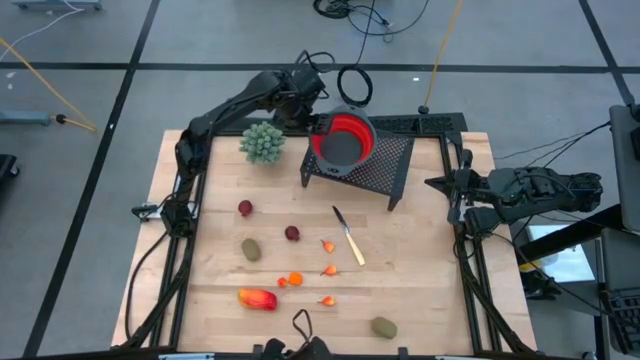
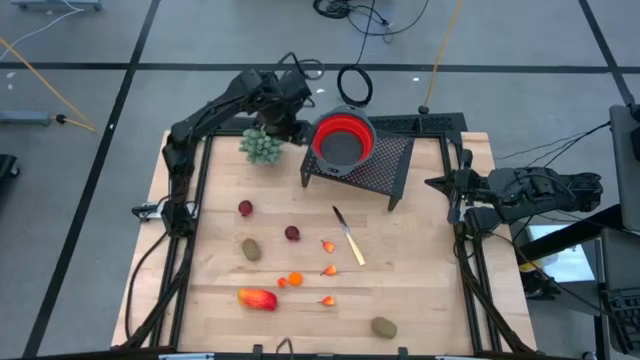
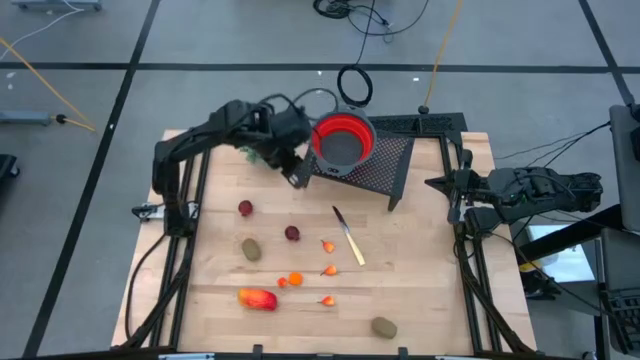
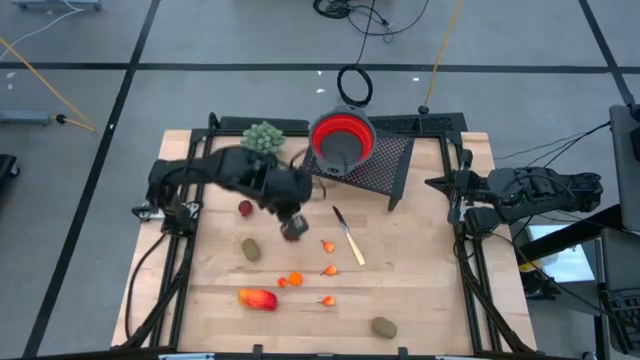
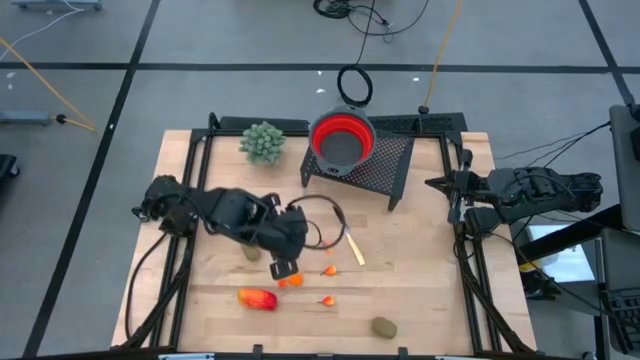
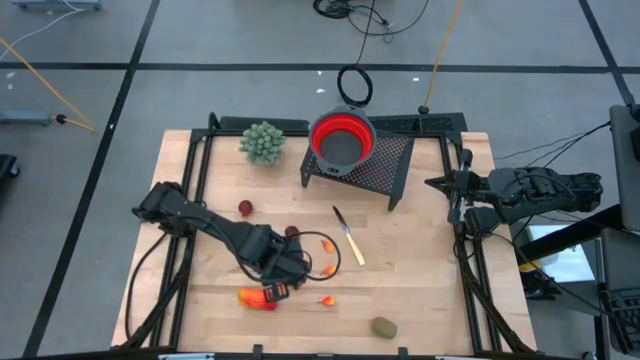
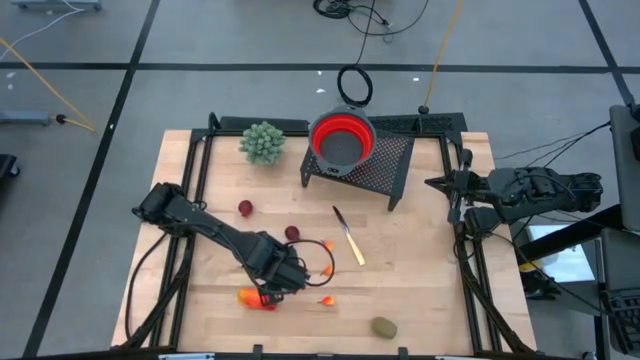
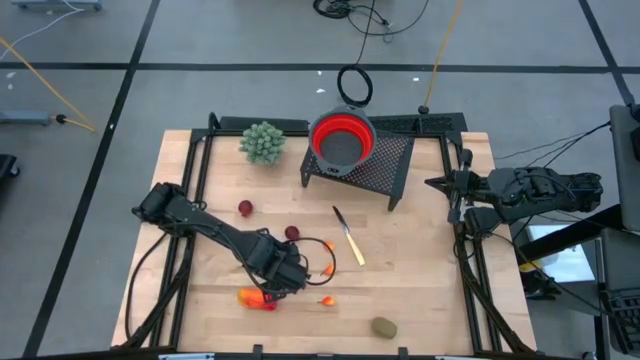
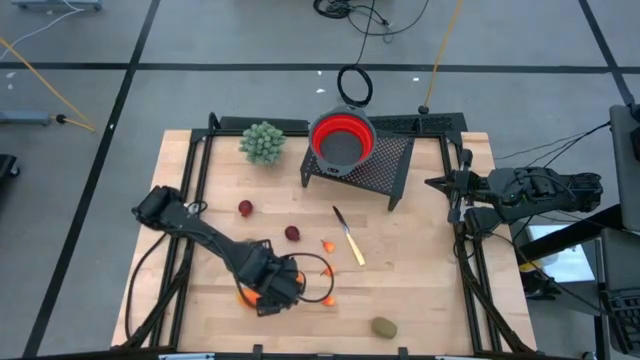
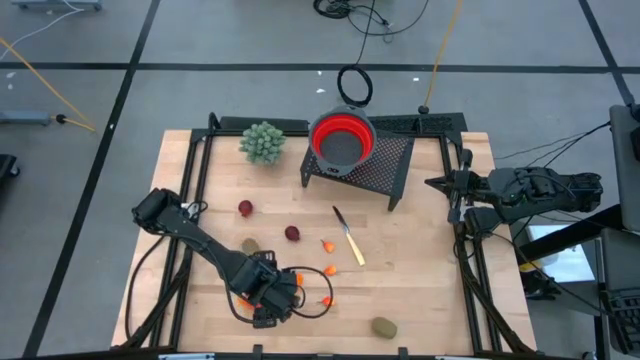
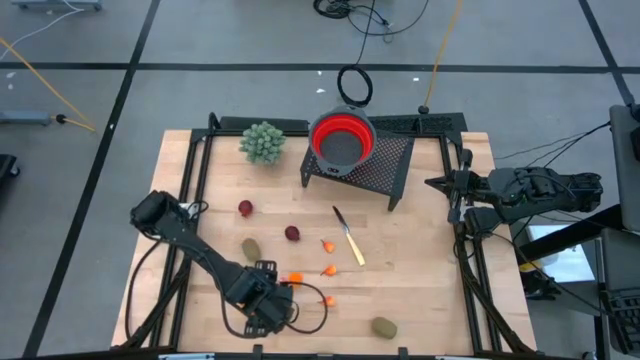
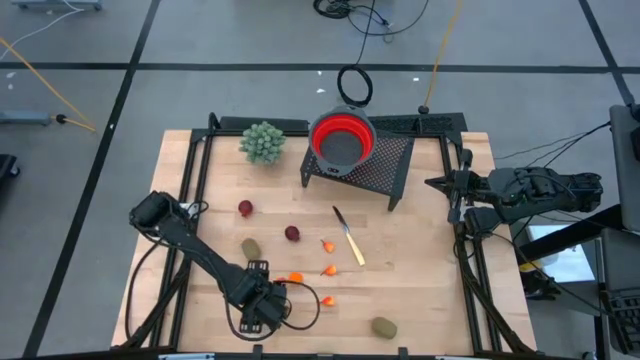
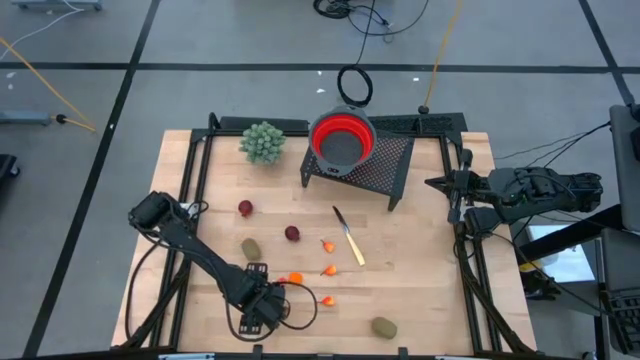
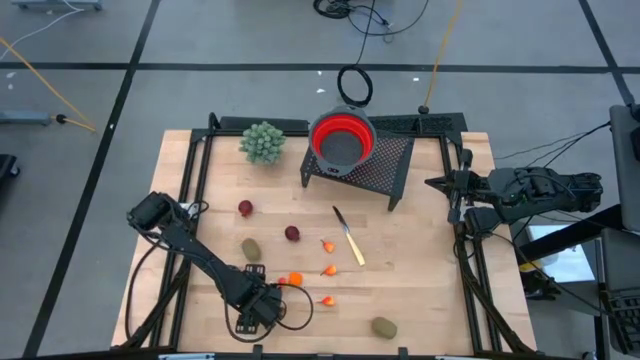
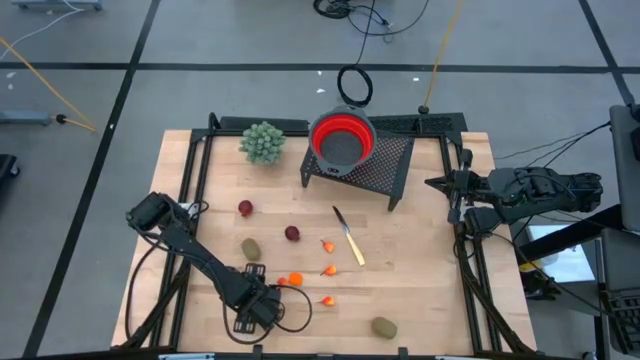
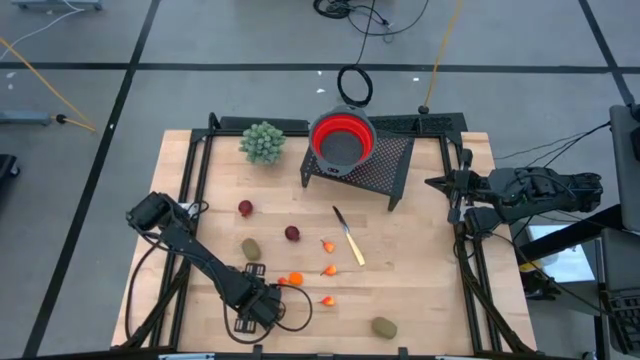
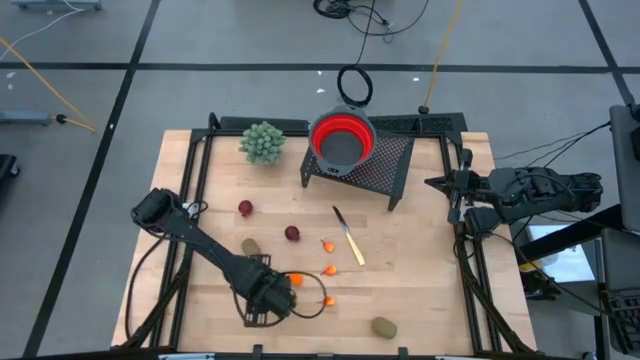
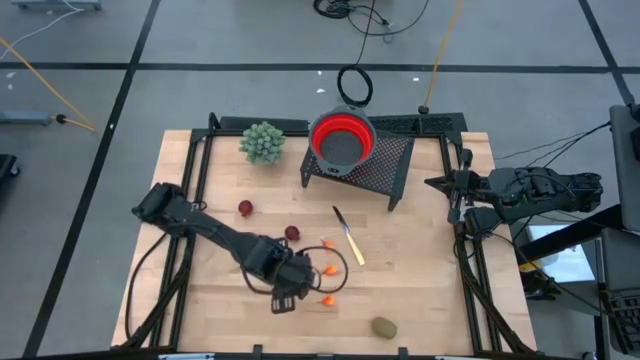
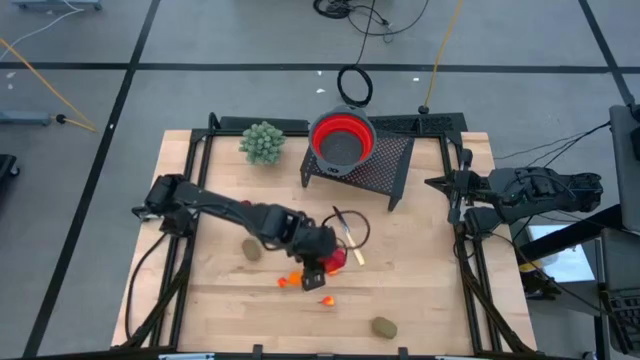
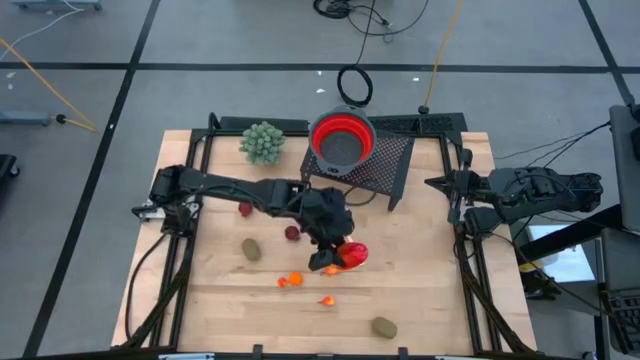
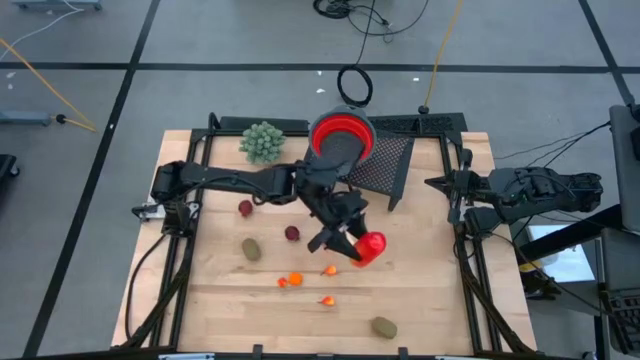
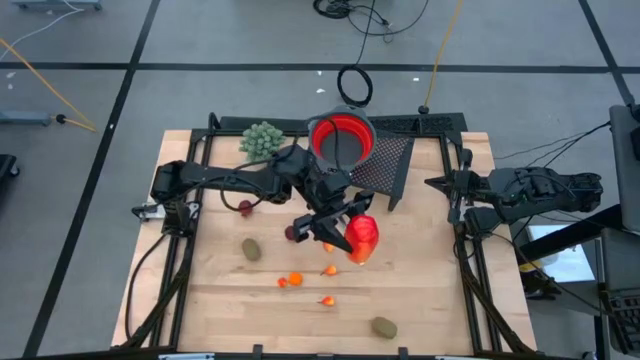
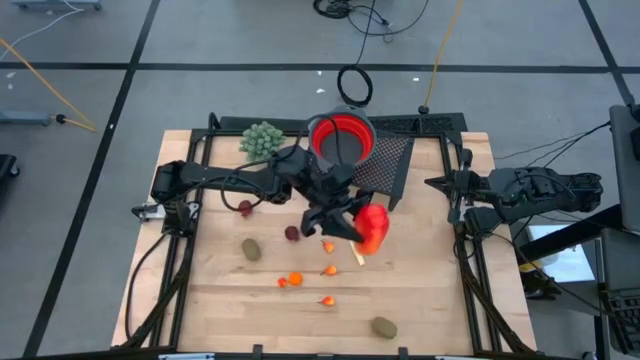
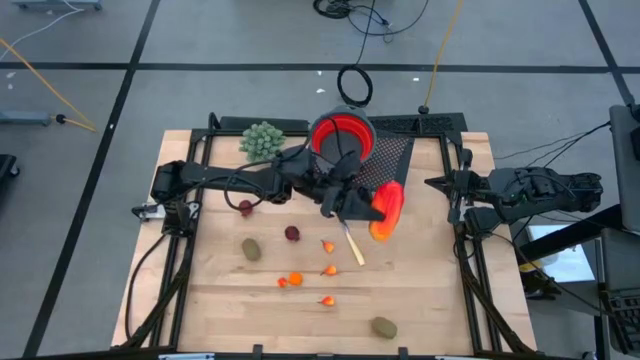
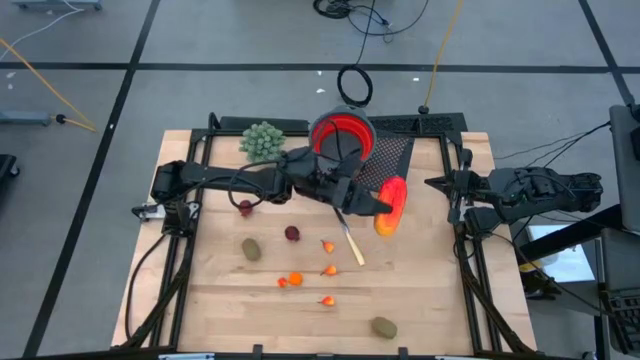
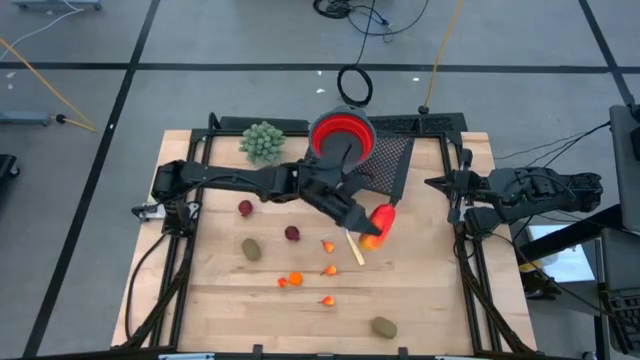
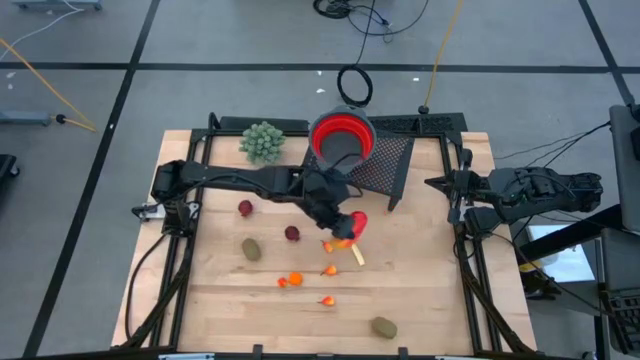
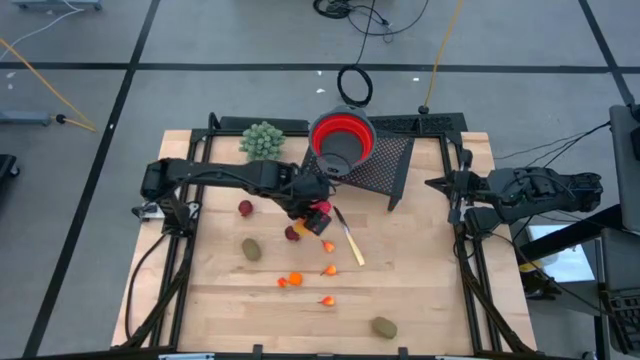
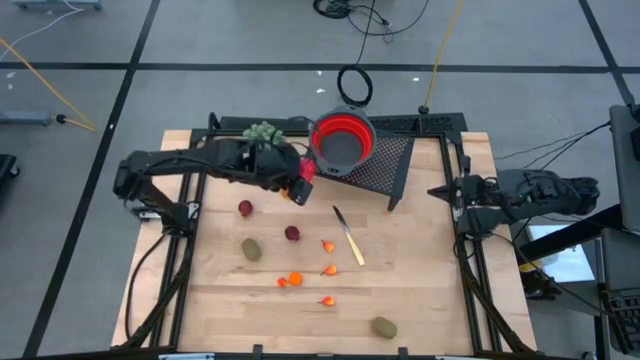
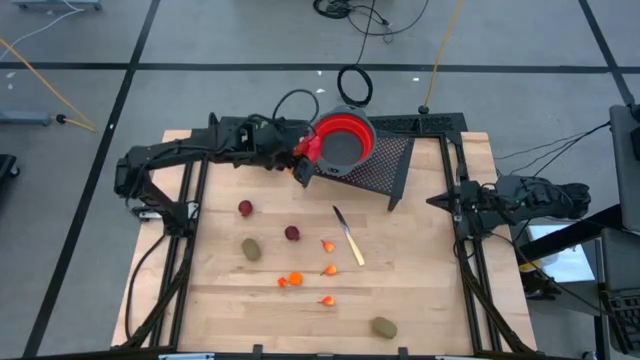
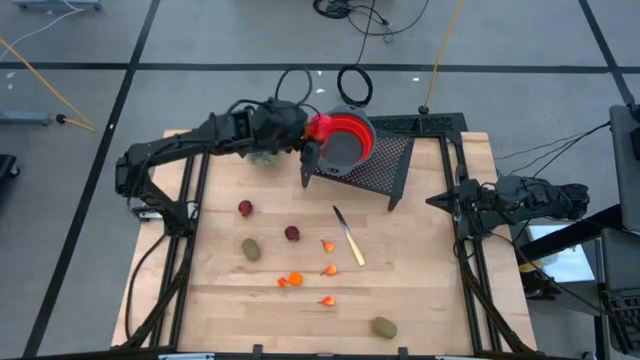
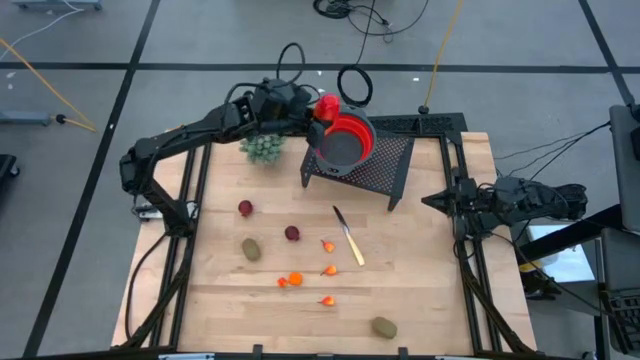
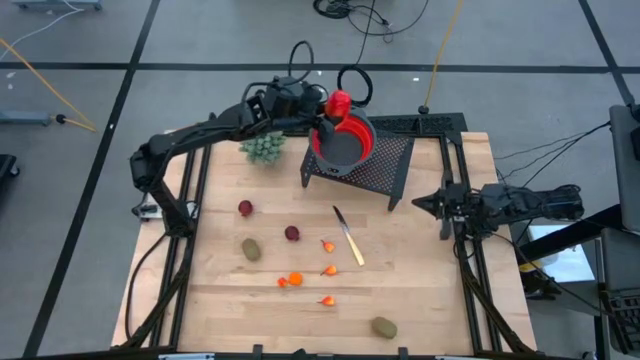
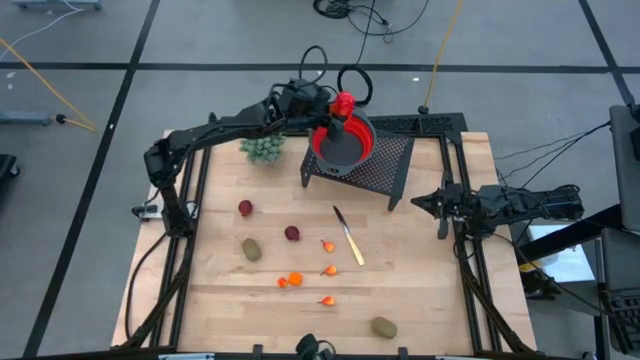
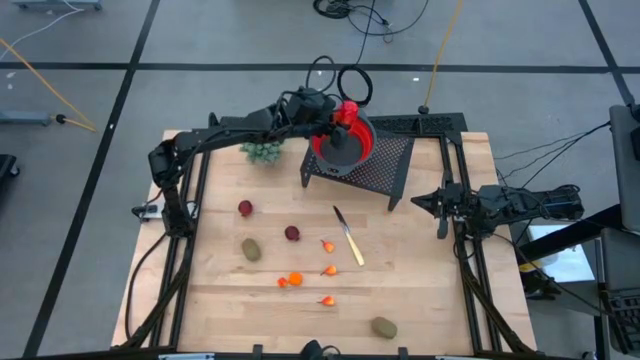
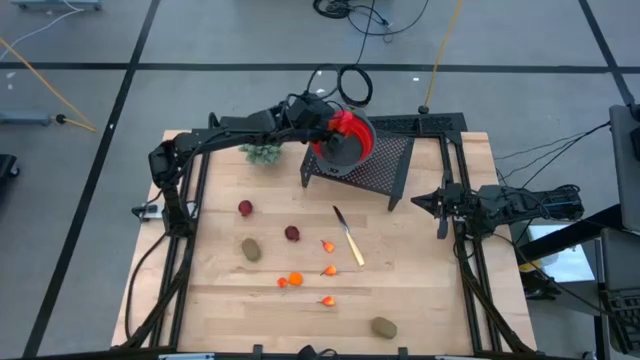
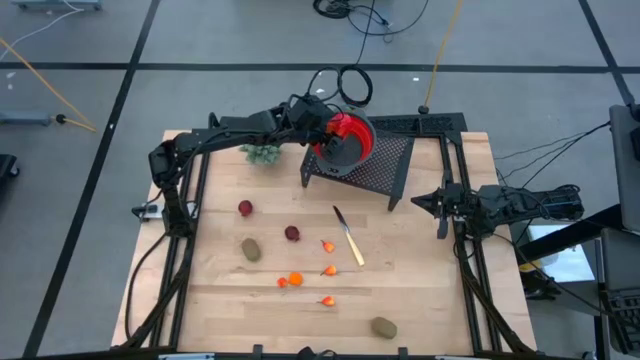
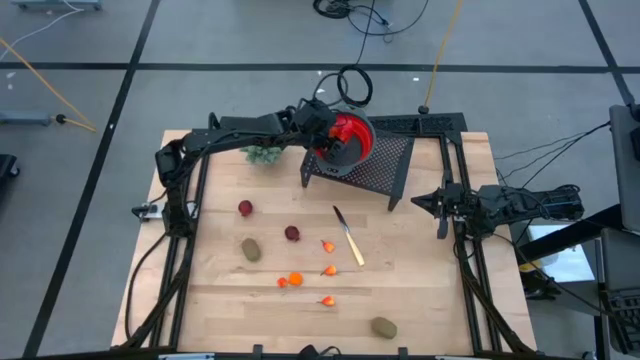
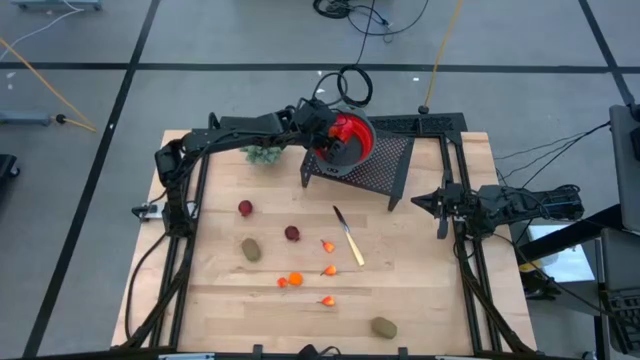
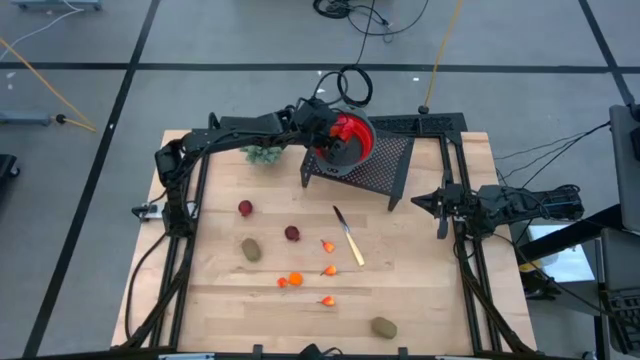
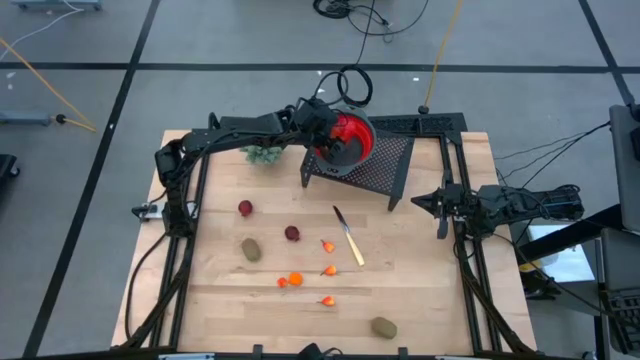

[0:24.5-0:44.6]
Task: Pick & Place Fruit
Put the red mango into the red strainer bowl on the shelf
